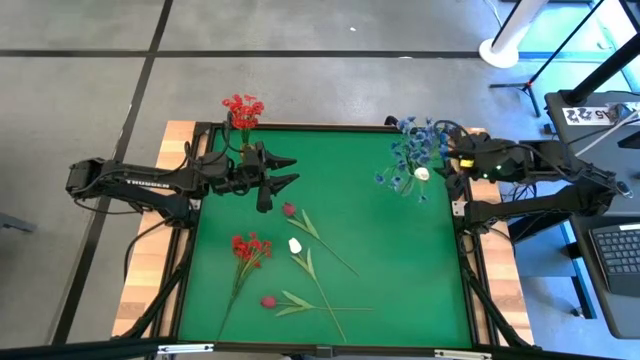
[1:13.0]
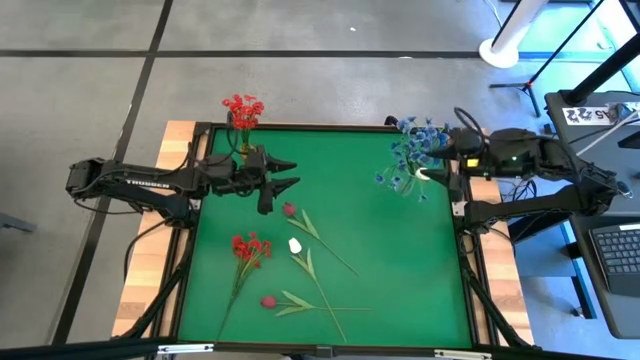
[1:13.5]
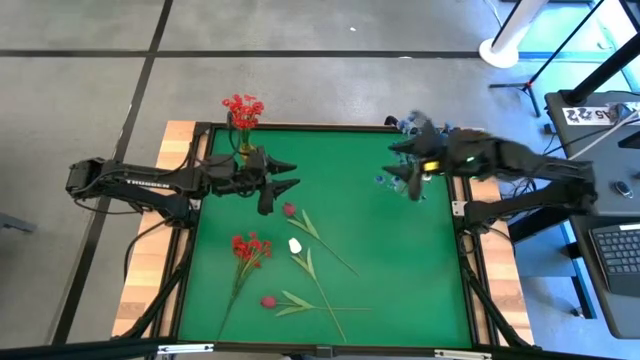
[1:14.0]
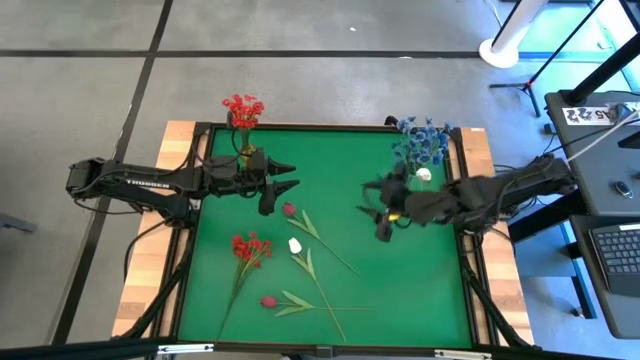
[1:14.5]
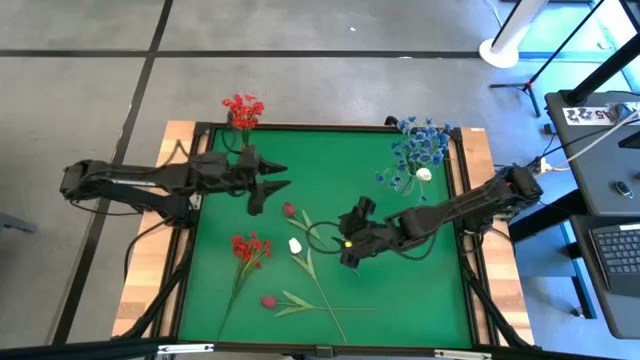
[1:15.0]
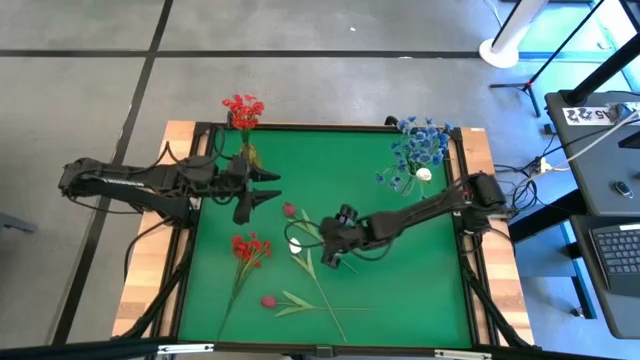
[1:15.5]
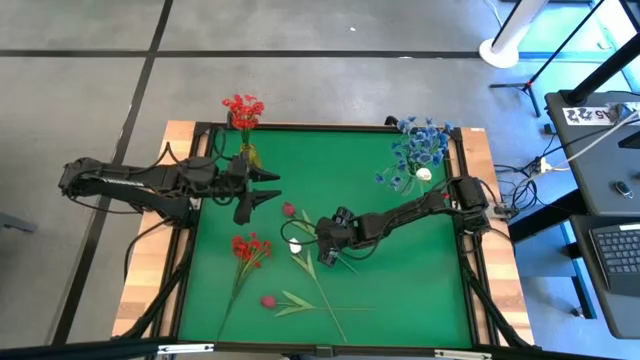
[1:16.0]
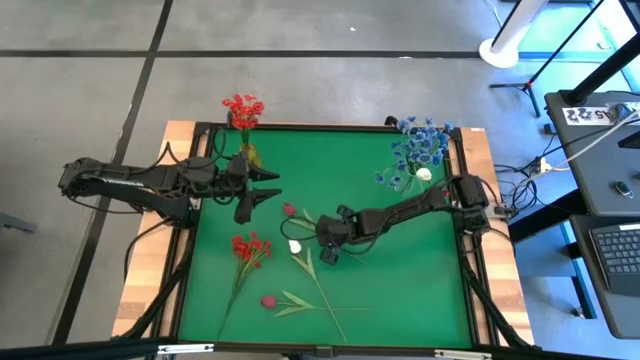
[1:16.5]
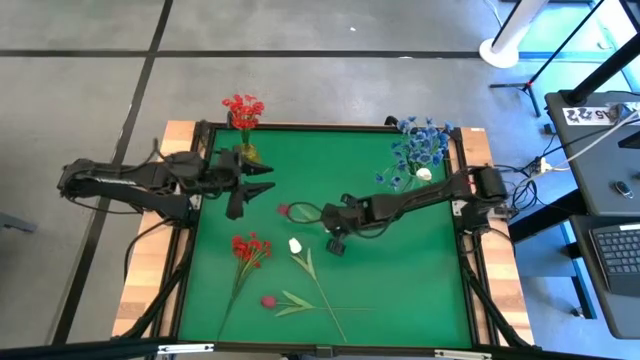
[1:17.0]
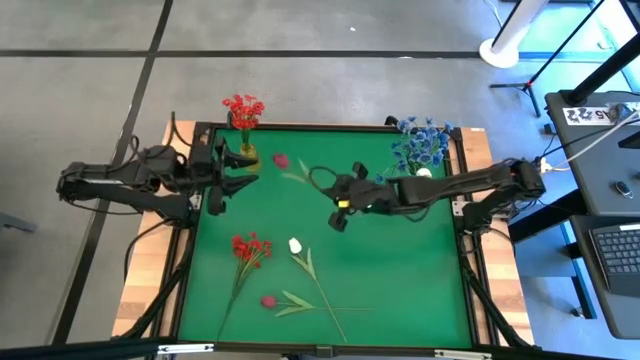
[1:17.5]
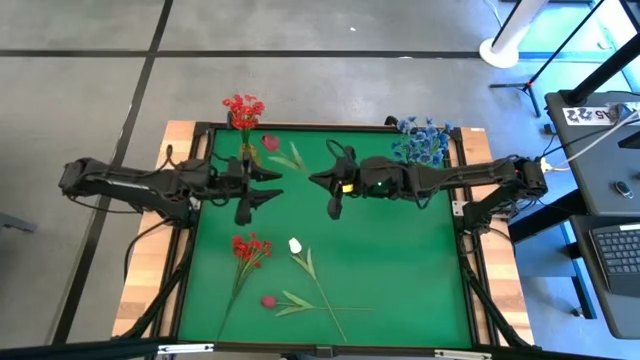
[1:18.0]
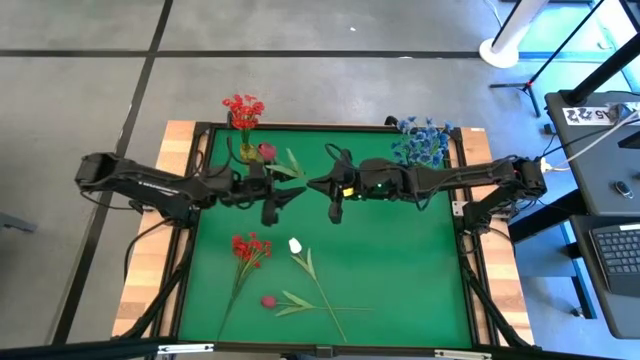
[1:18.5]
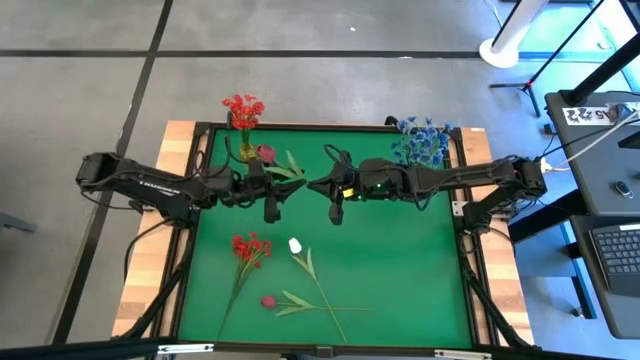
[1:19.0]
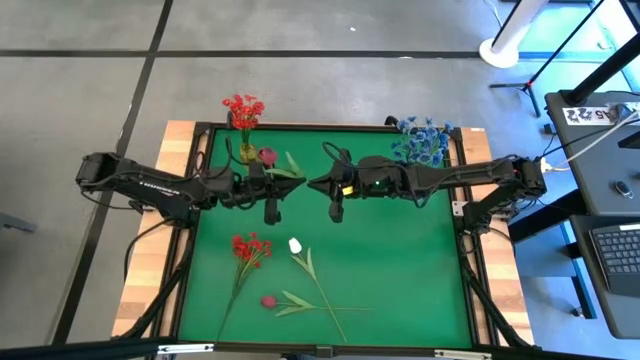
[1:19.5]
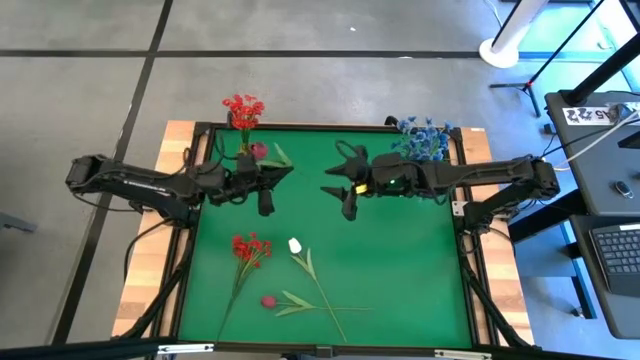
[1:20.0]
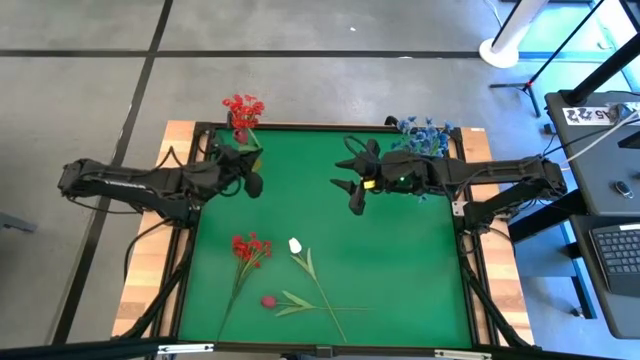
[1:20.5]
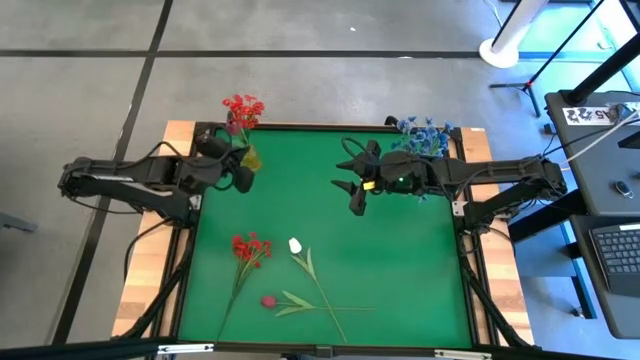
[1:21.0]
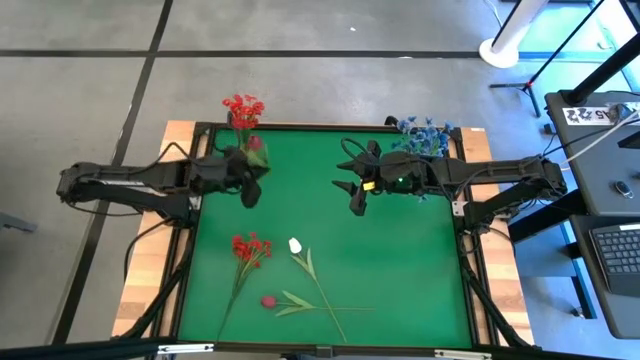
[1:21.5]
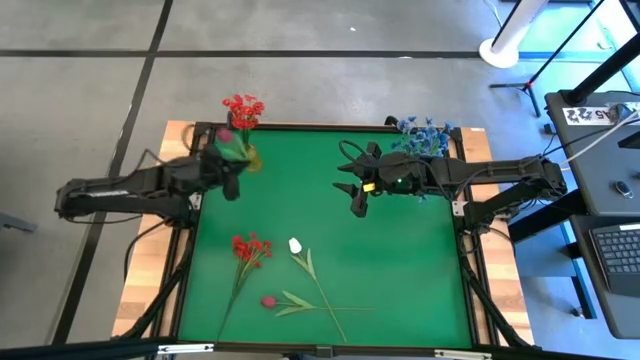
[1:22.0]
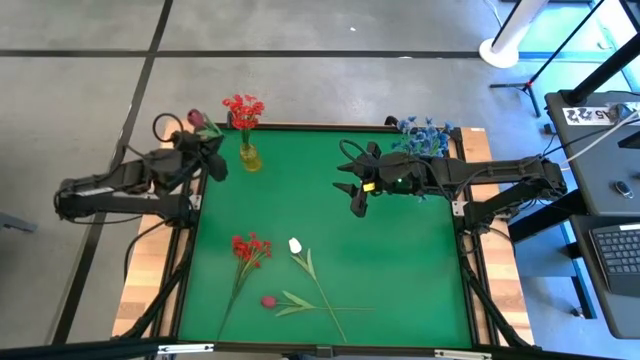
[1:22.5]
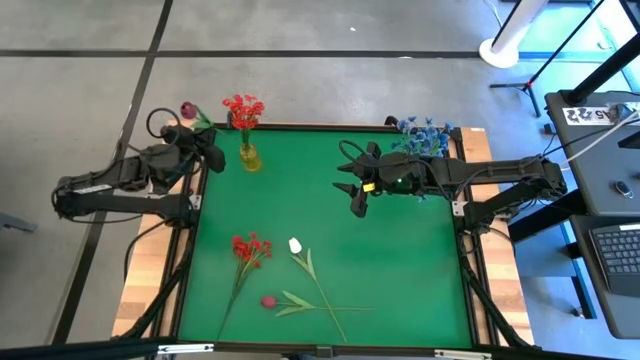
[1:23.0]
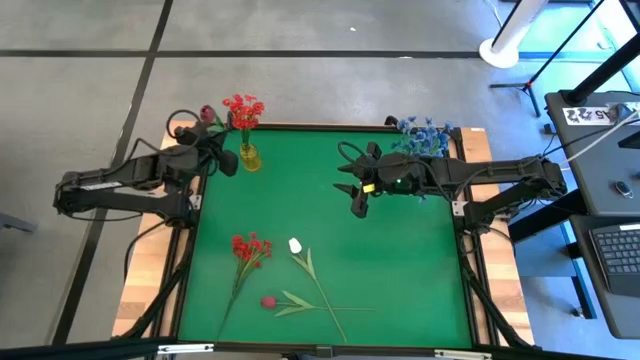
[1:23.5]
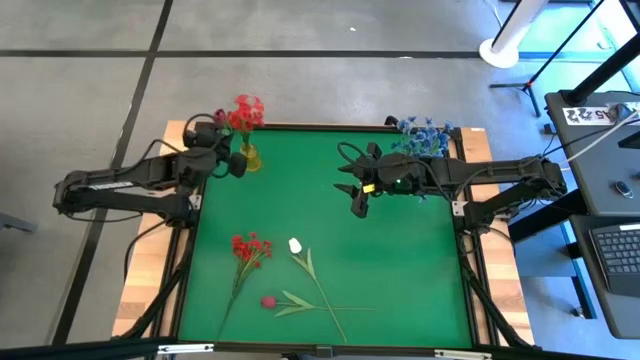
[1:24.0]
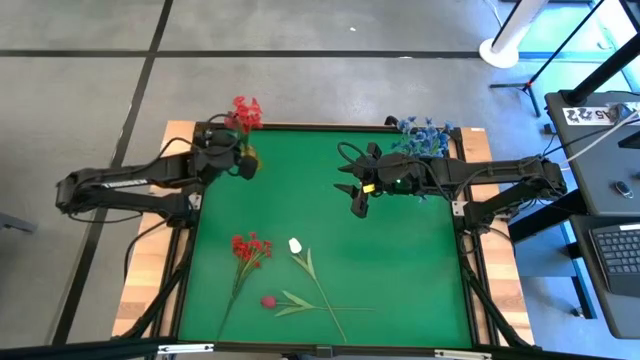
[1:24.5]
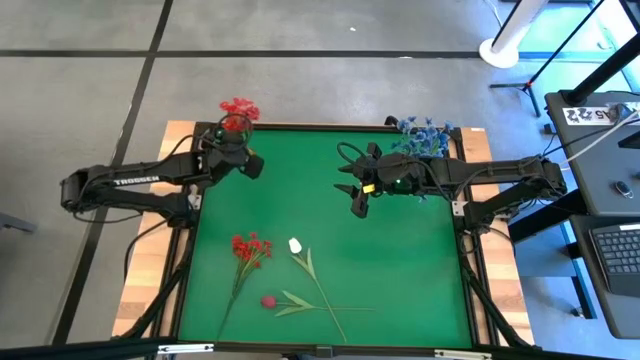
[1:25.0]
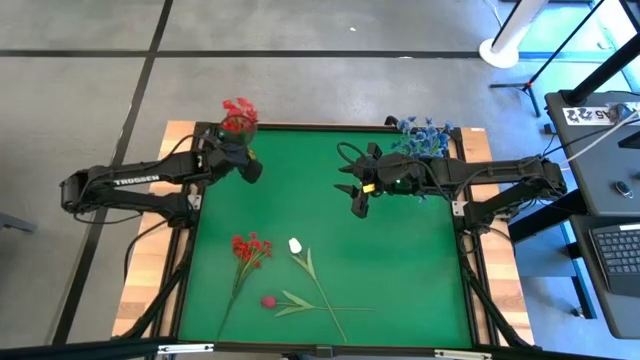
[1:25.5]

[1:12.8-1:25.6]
Task: Sort flowers into vase by color
Put the top dark red flower into the yellow vase

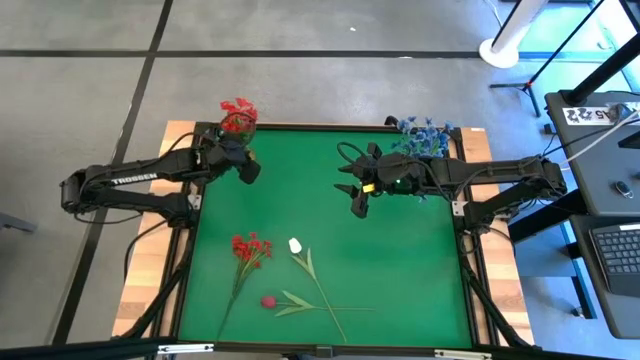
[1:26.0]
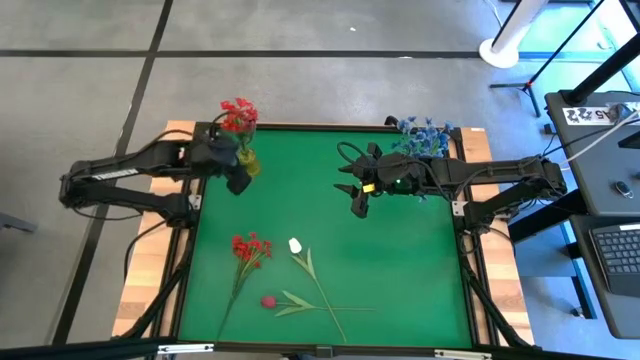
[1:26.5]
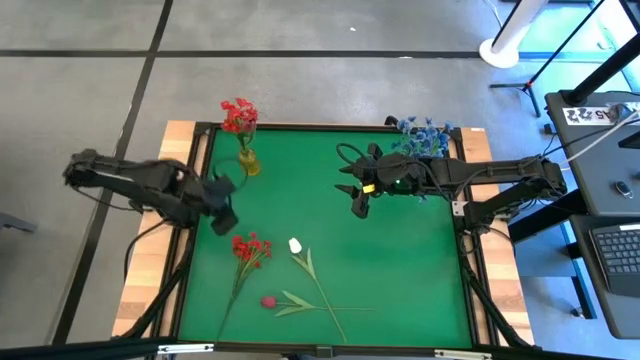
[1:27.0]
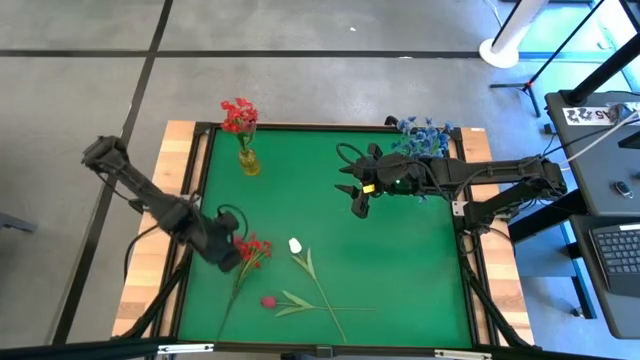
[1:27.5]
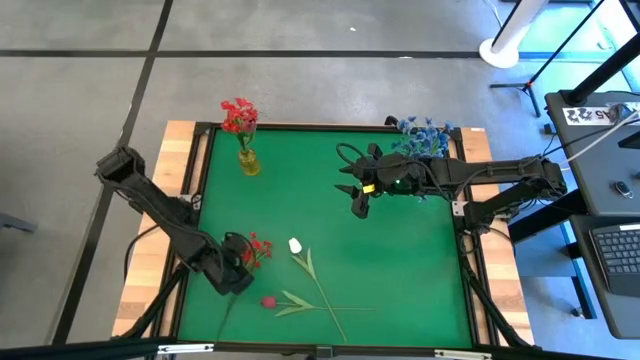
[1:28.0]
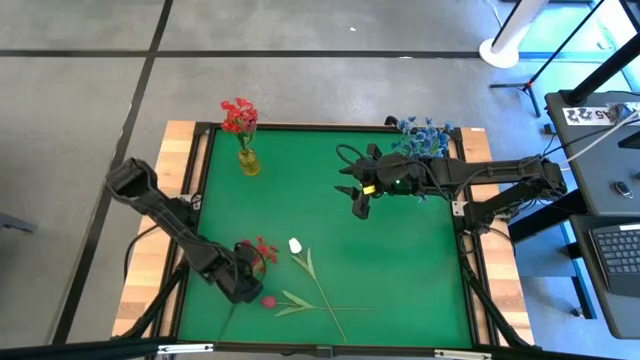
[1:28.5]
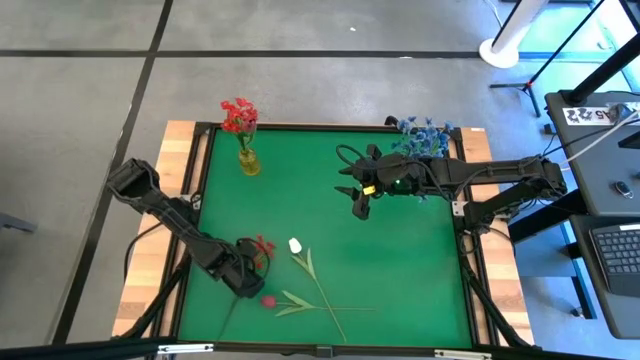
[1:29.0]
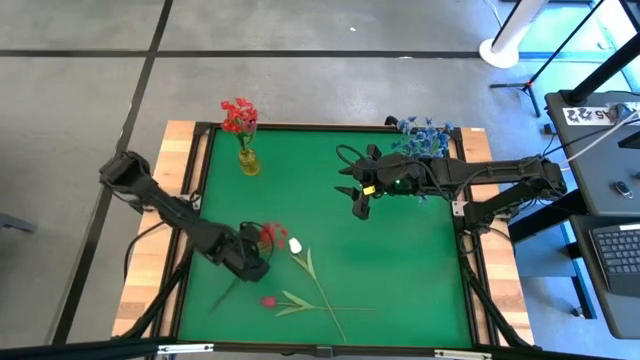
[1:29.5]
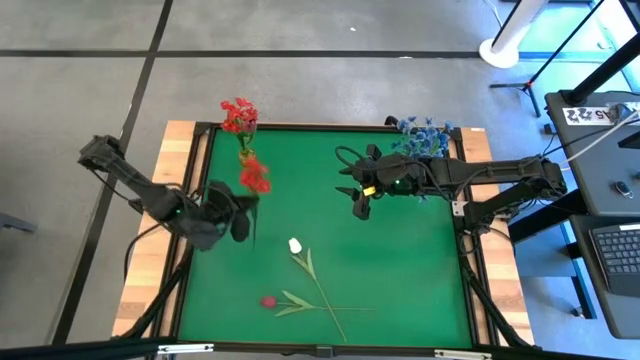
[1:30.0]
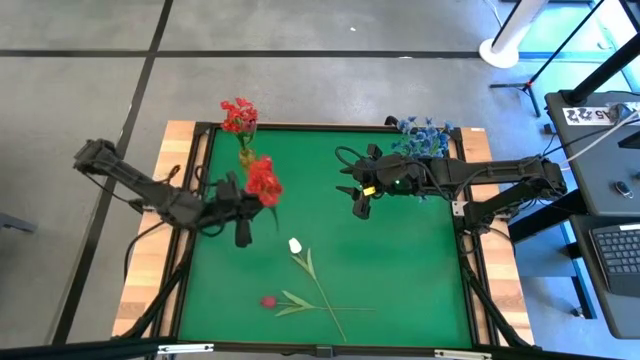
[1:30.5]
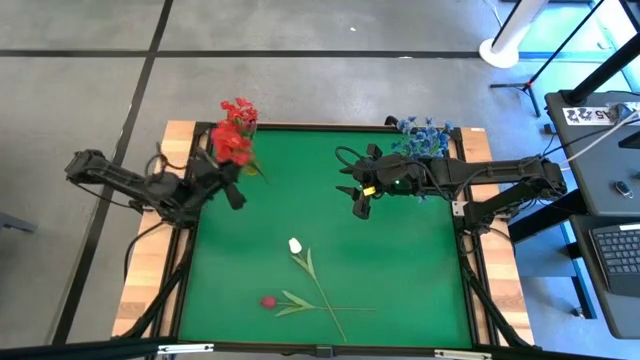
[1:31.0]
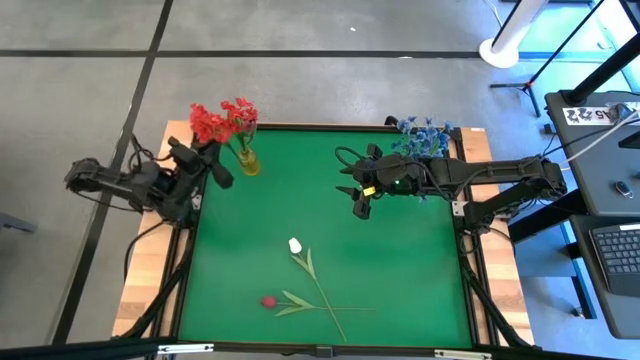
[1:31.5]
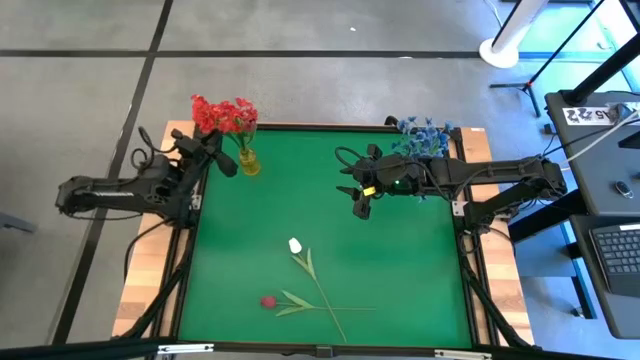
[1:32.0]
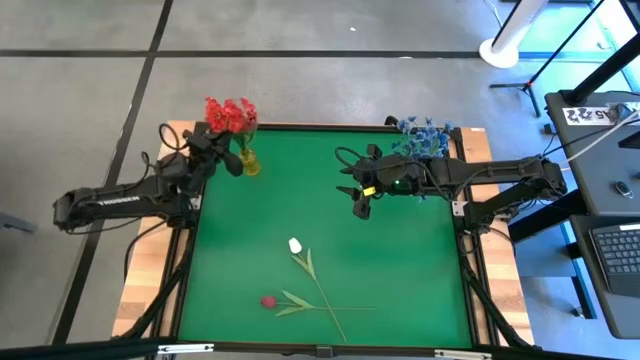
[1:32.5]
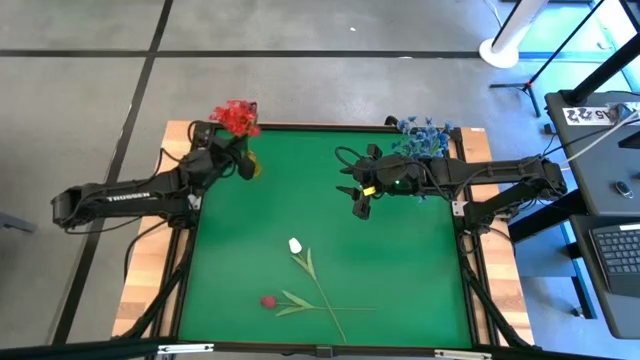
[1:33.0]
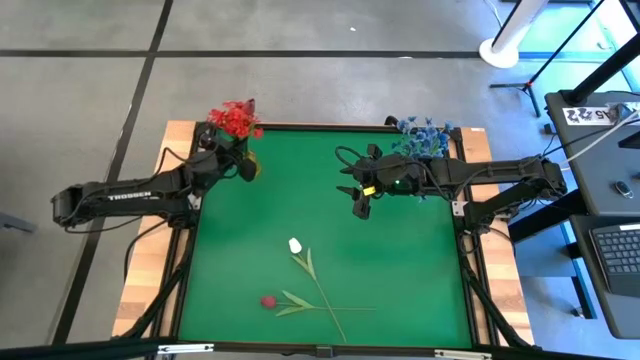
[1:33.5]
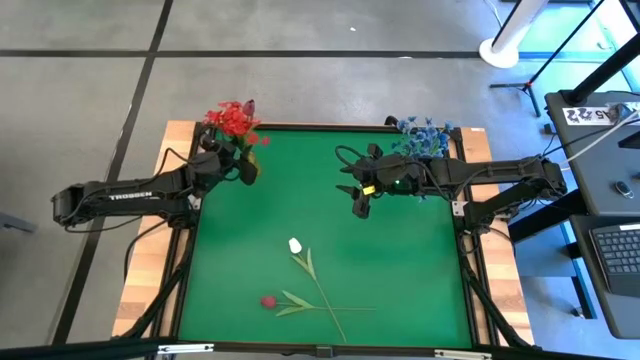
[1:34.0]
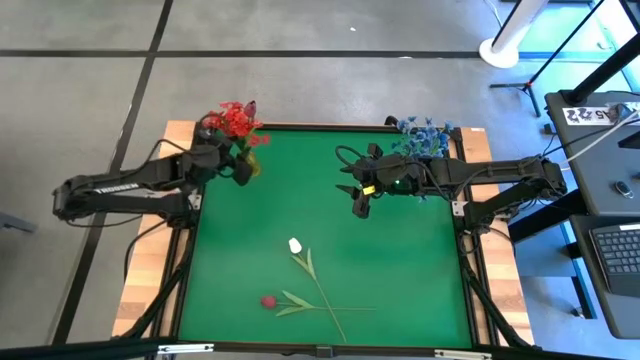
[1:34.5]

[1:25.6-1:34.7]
Put the red flowers into the yellow vase
